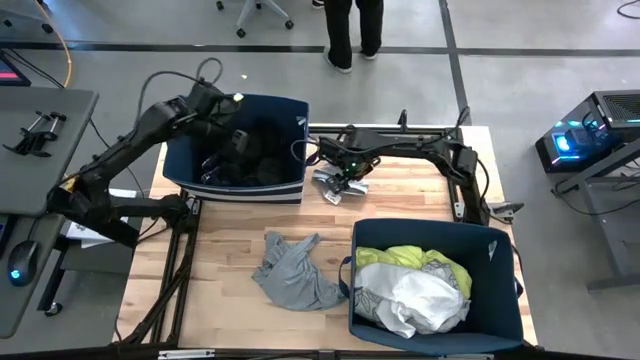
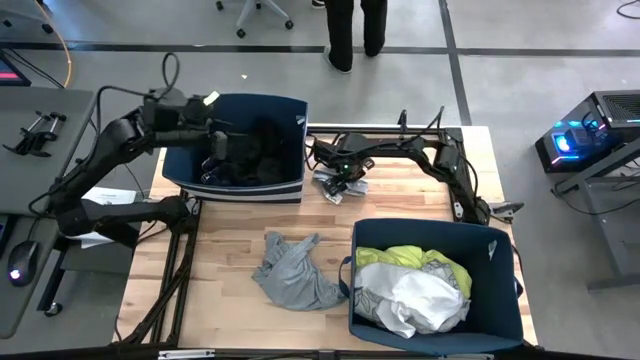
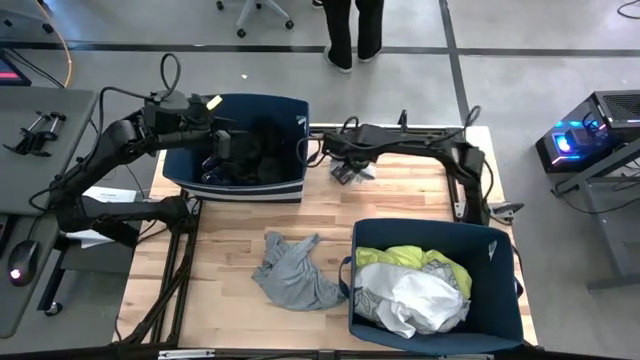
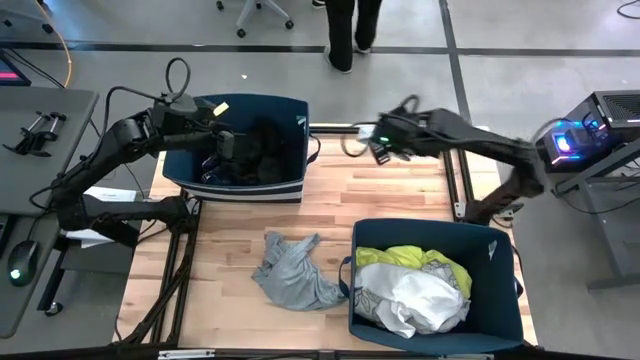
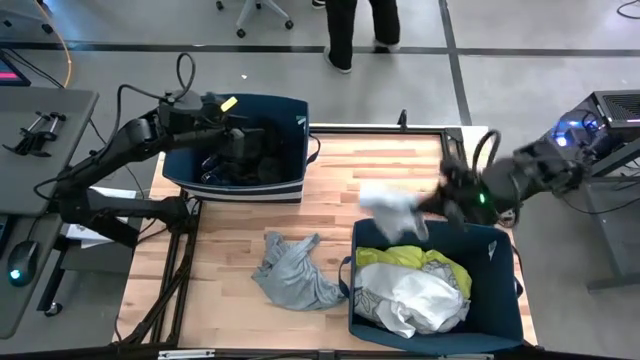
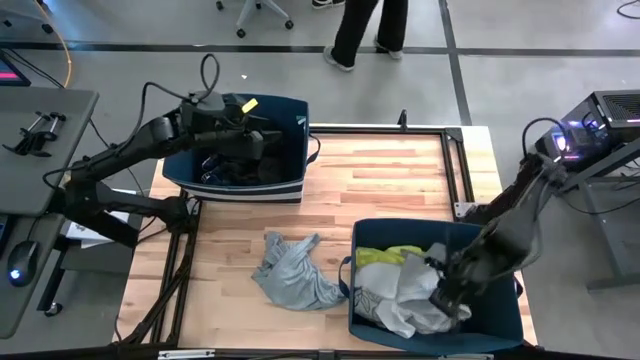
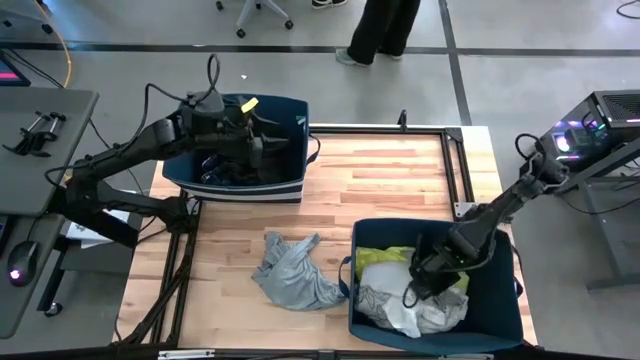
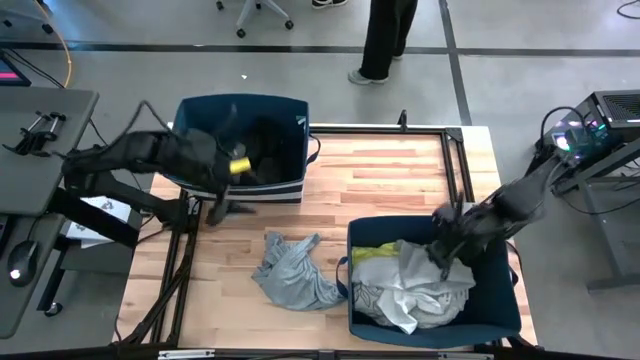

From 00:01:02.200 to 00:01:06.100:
Task: Sort clothes
Put the gray underwear into the bottom blue laundry bin

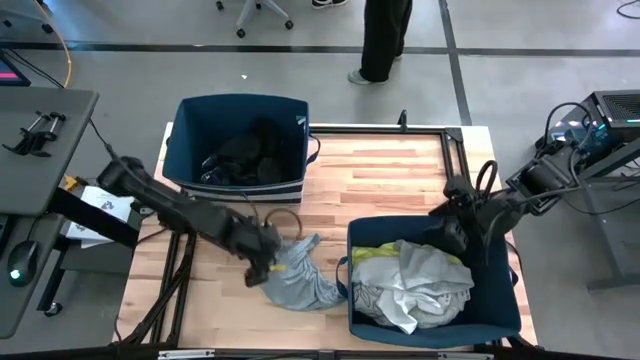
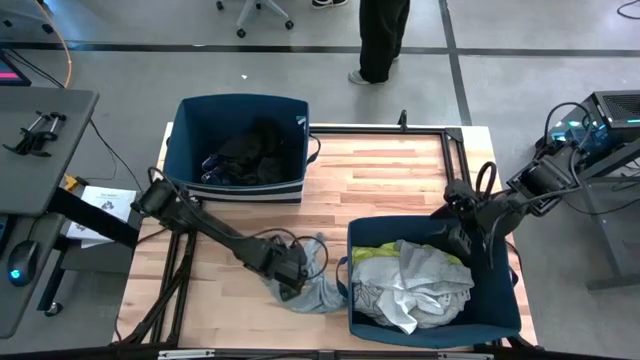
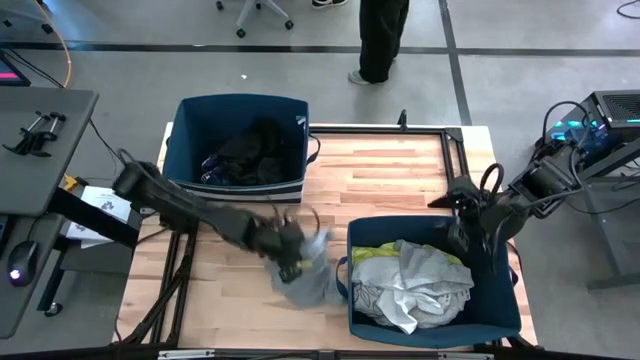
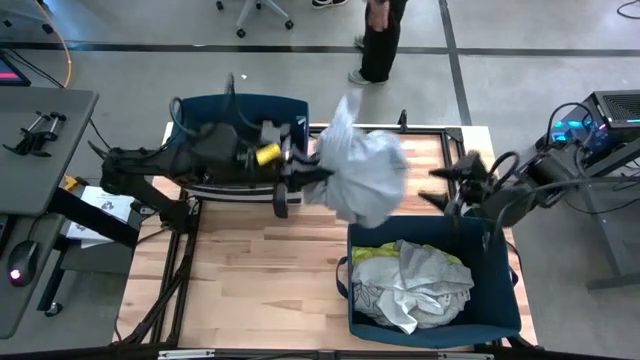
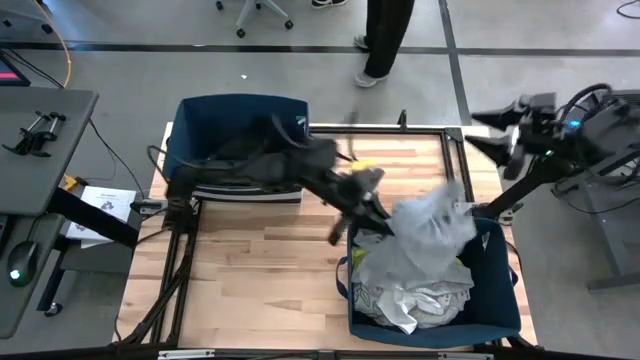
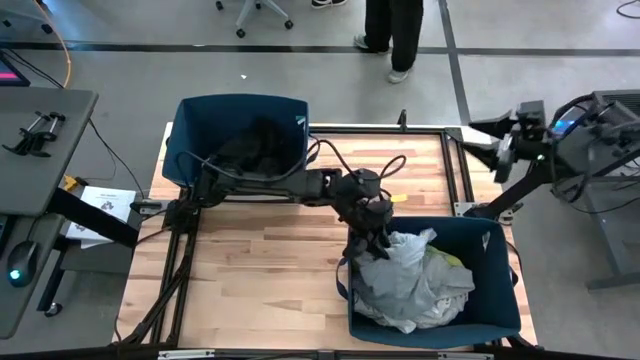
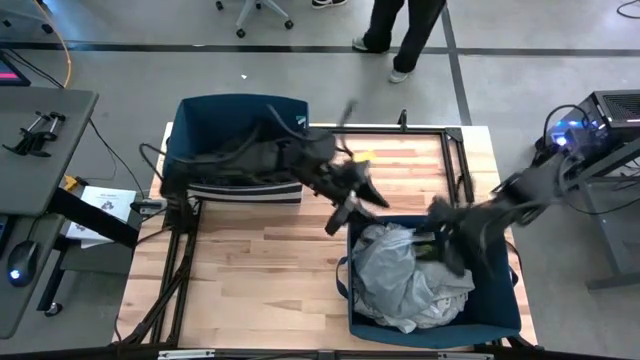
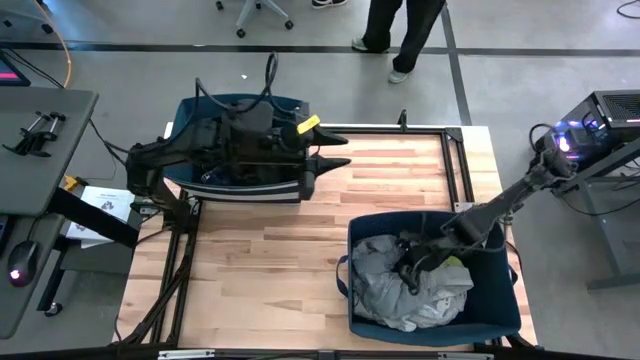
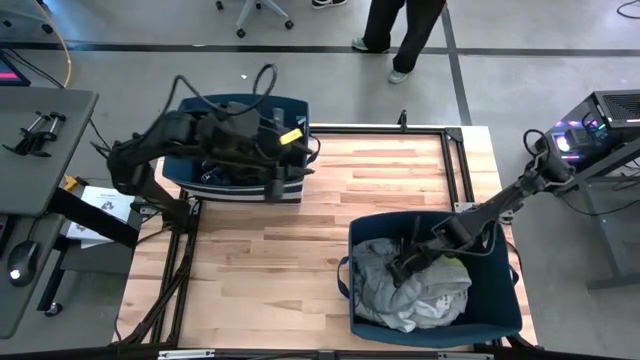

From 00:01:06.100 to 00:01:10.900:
Put the gray shirt into the bottom blue laundry bin

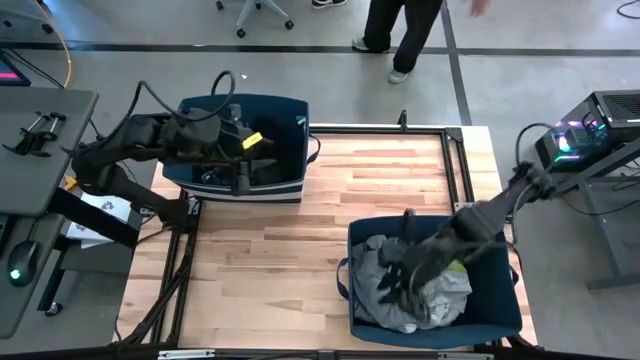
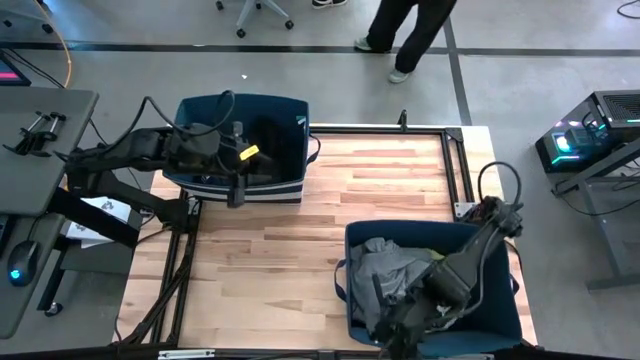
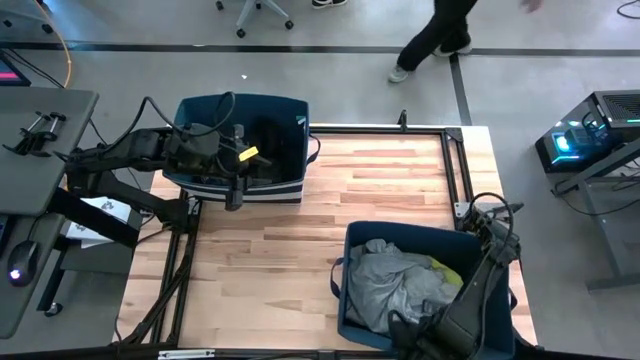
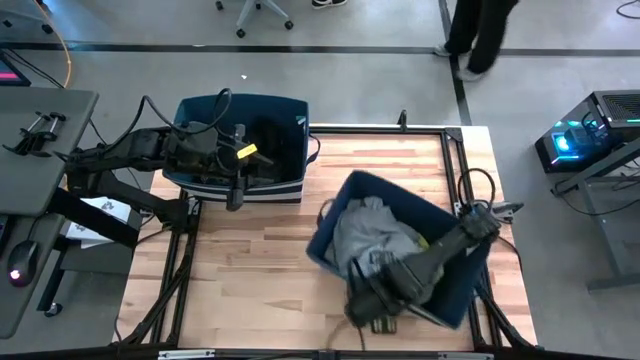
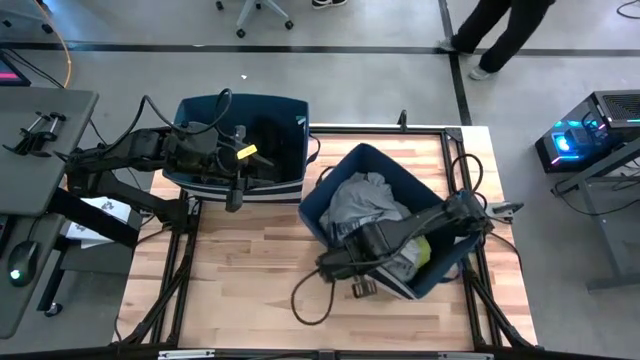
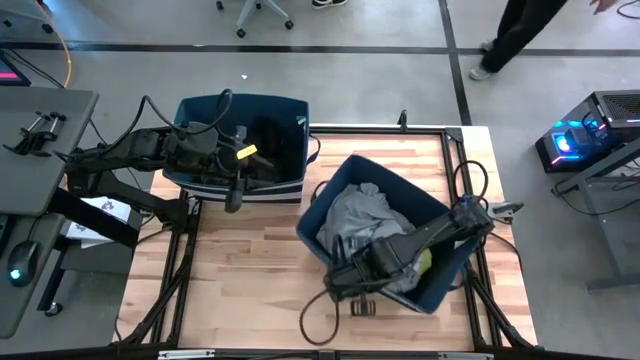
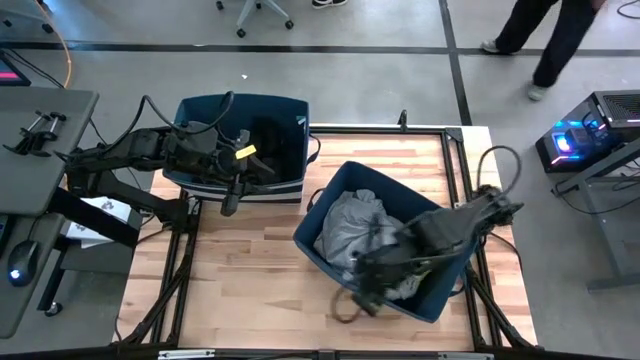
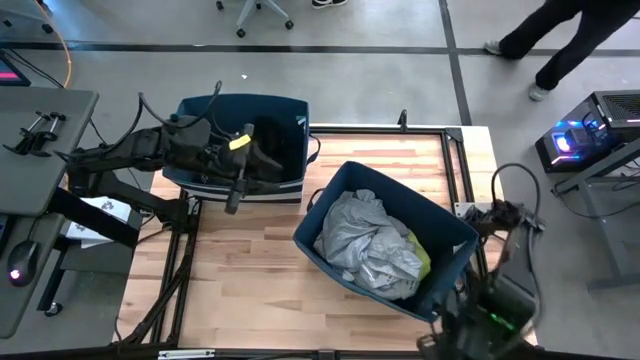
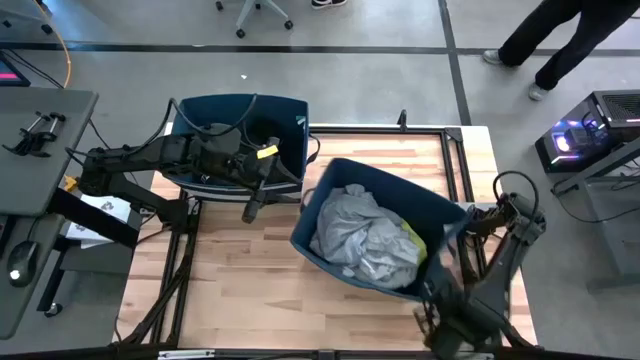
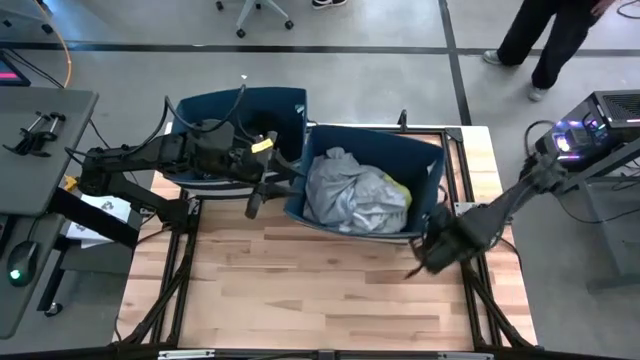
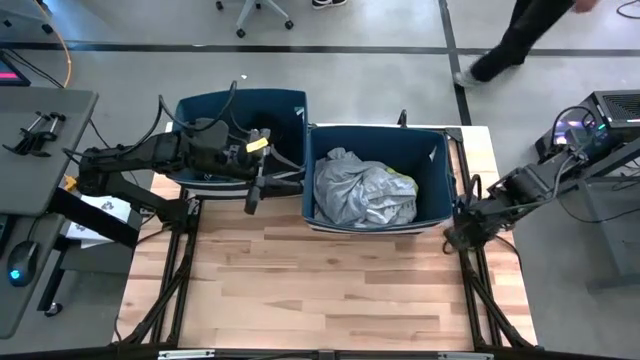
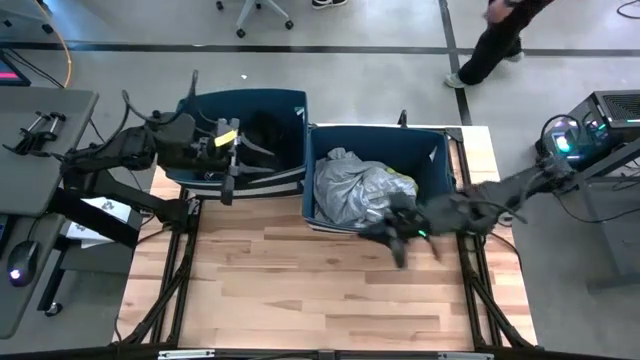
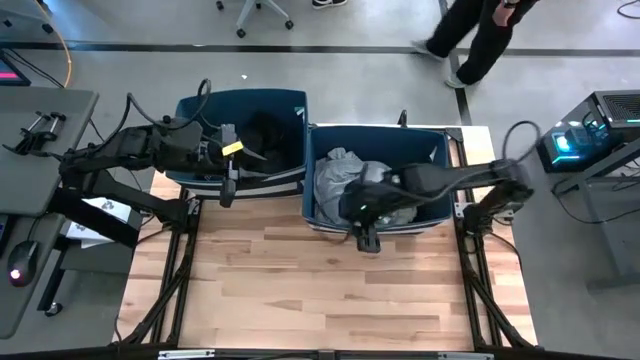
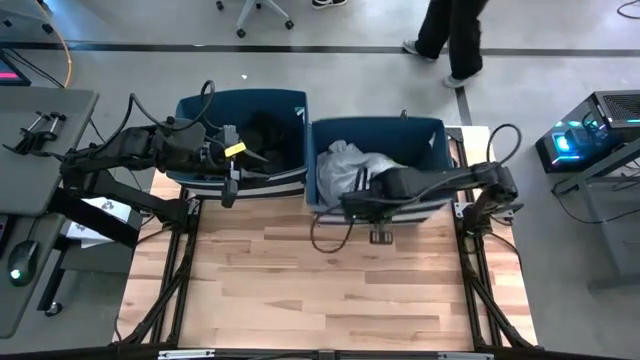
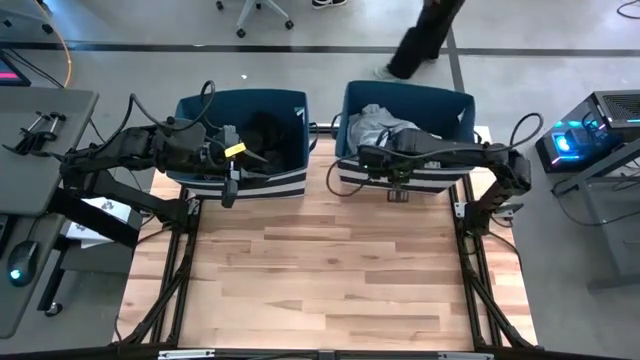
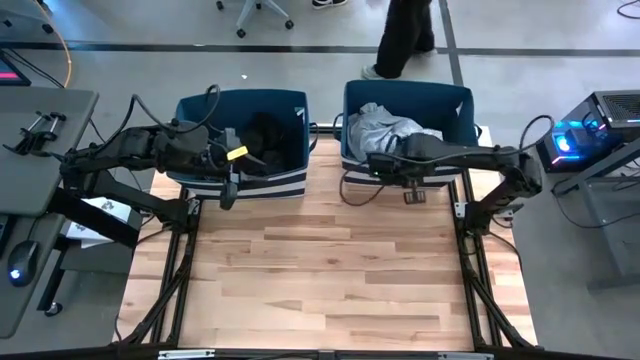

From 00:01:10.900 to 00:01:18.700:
Move the bottom blue laundry bin to the top right of the table

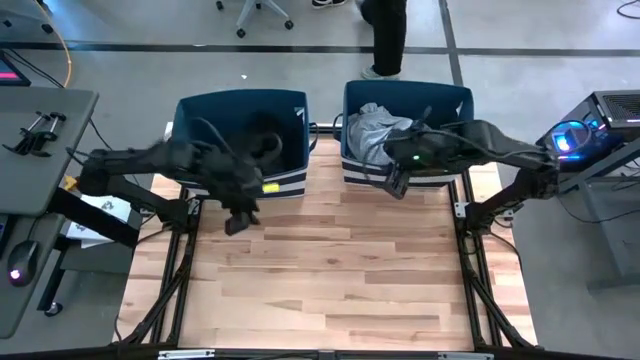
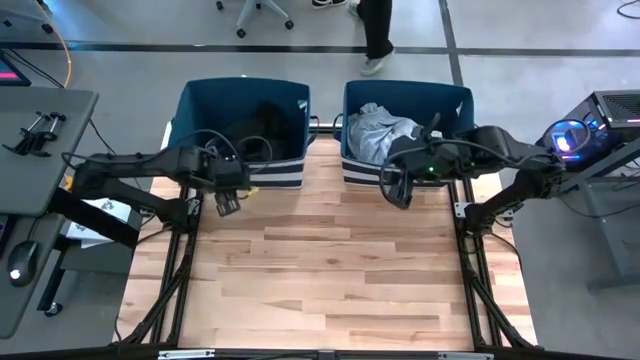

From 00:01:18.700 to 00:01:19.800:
Adjust the left blue laundry bin

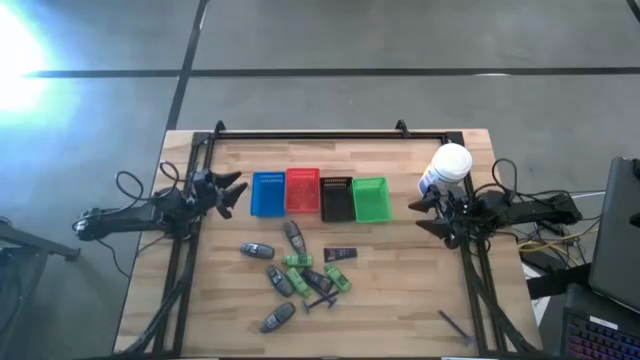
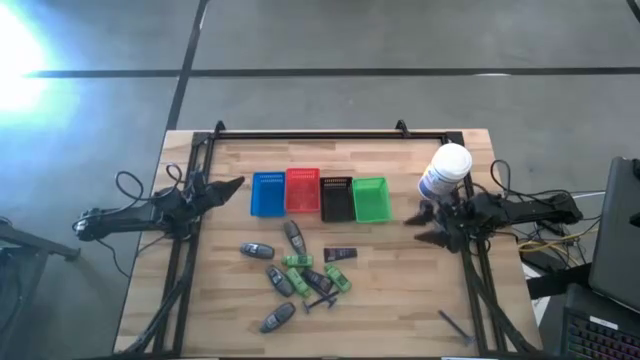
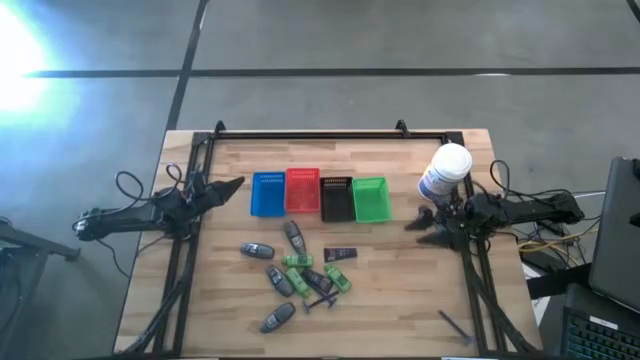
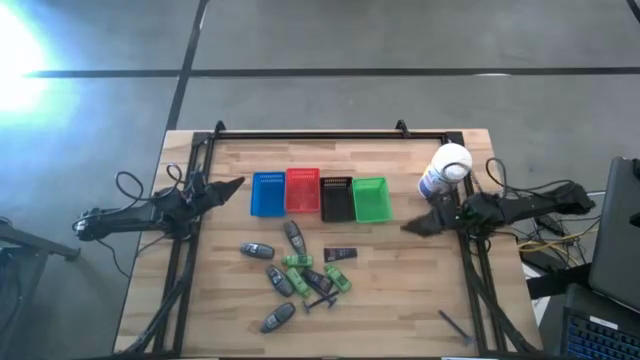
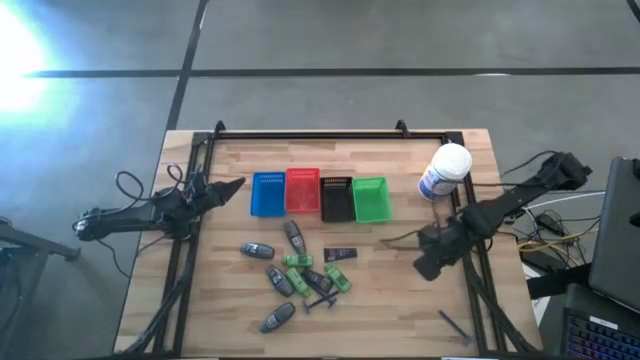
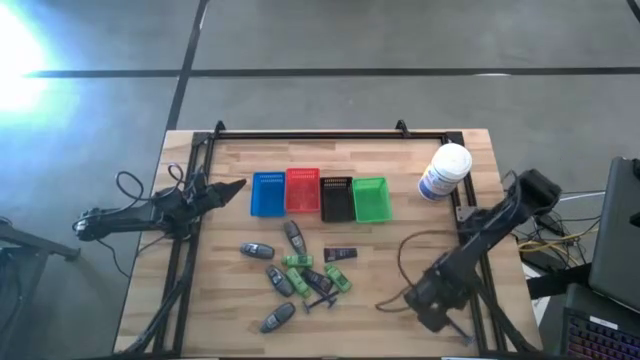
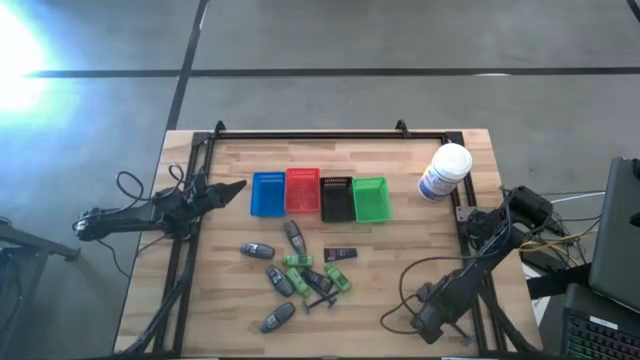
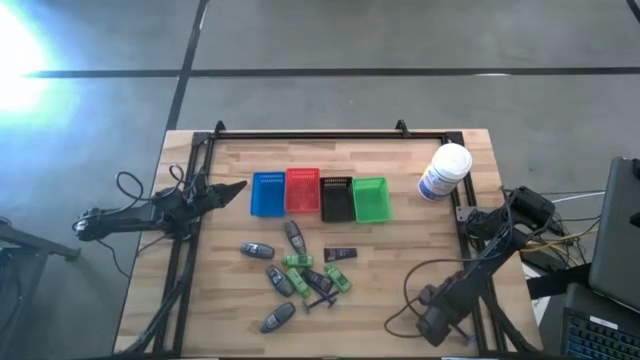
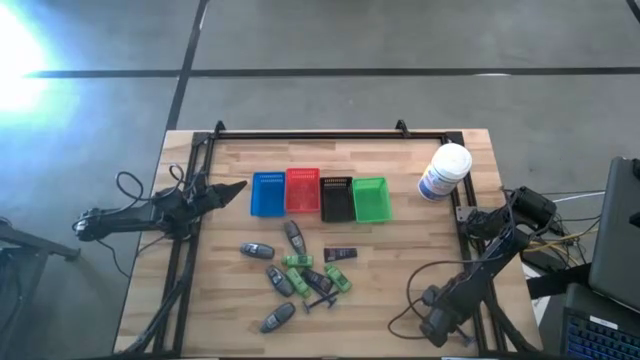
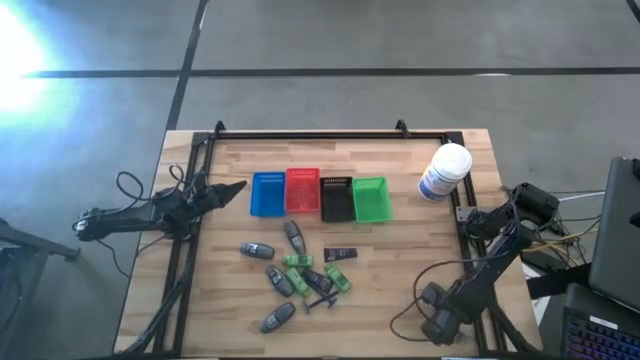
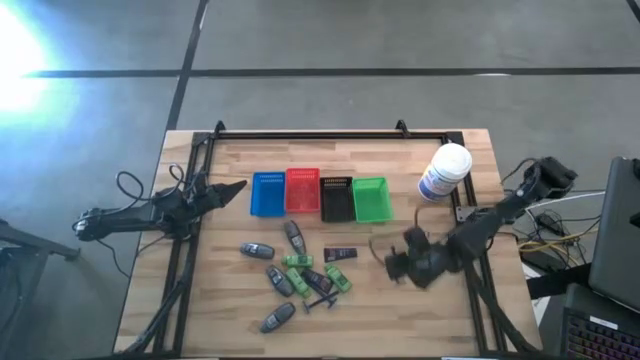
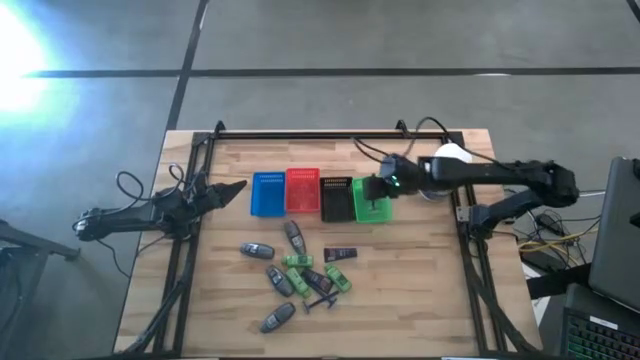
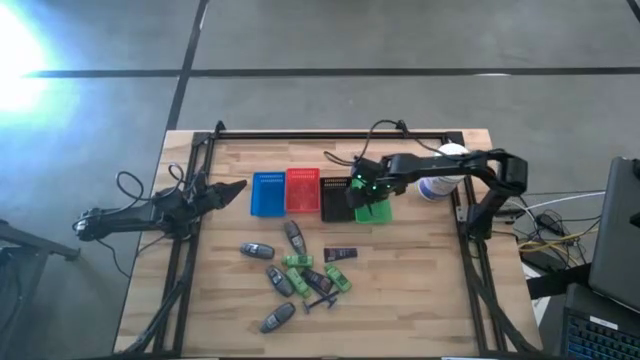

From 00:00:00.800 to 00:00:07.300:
Task: Pick & Place Travel size toiletries
Put the blue razor into the green bin
